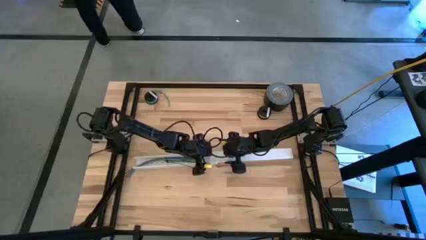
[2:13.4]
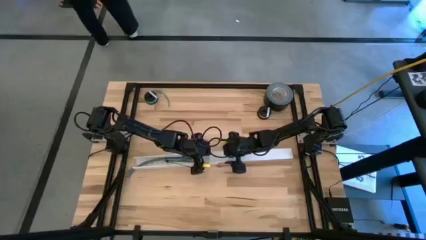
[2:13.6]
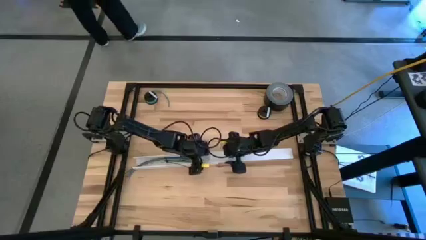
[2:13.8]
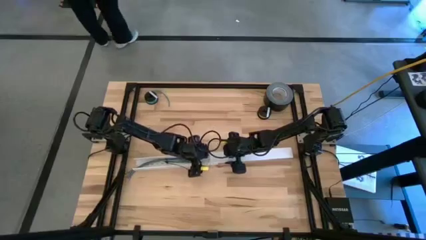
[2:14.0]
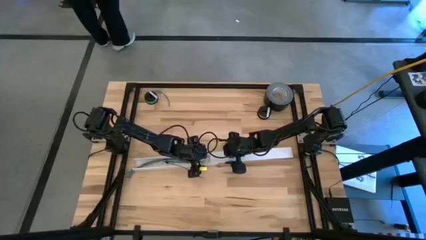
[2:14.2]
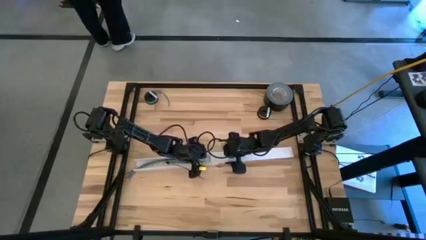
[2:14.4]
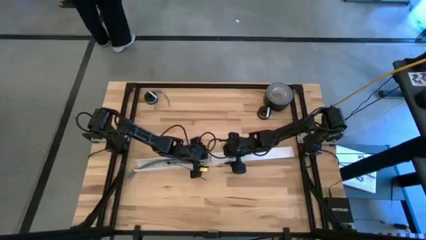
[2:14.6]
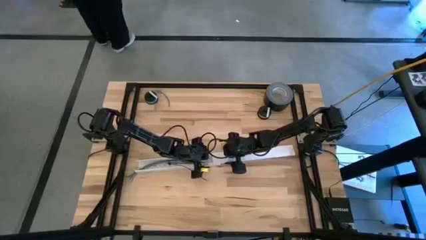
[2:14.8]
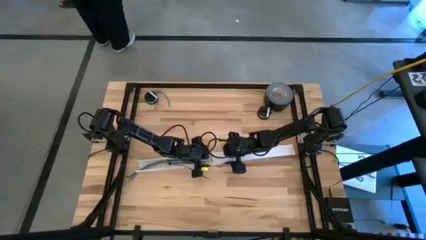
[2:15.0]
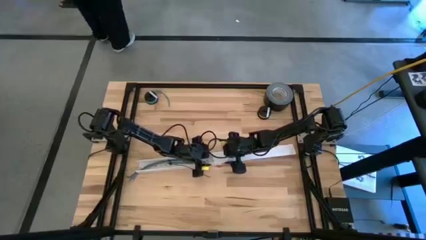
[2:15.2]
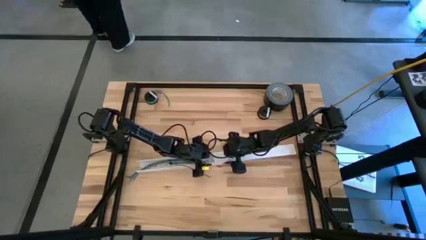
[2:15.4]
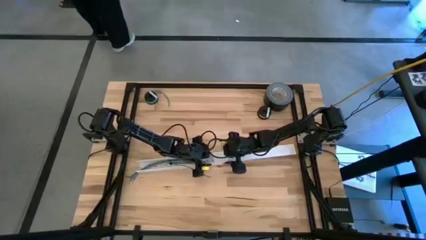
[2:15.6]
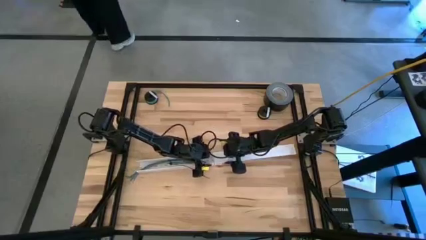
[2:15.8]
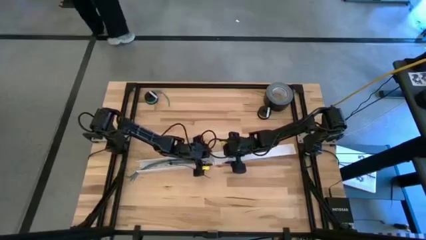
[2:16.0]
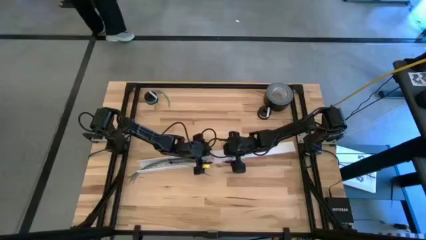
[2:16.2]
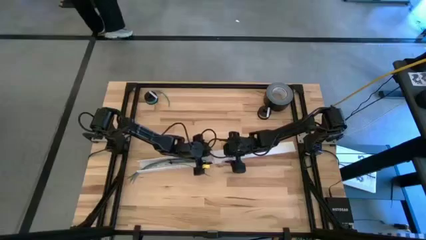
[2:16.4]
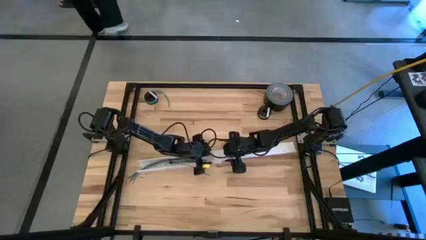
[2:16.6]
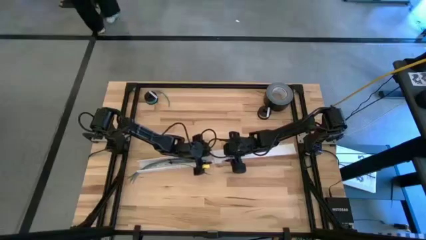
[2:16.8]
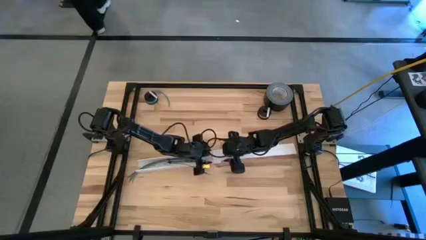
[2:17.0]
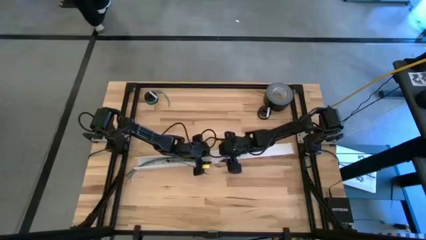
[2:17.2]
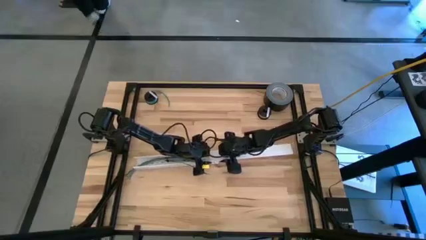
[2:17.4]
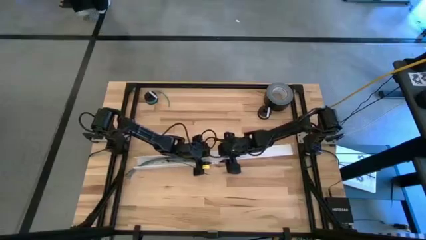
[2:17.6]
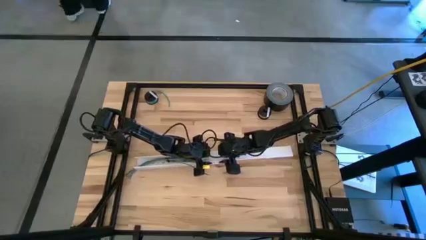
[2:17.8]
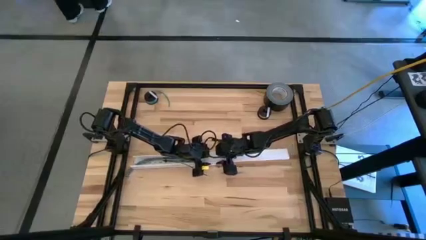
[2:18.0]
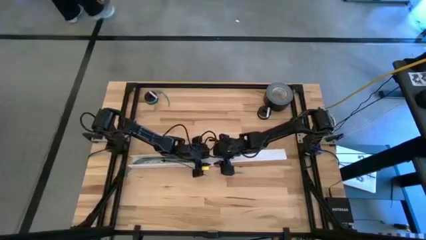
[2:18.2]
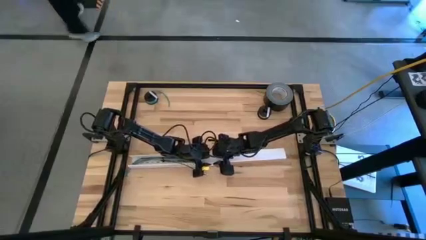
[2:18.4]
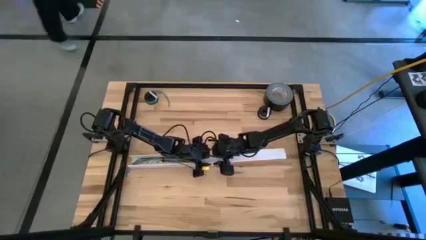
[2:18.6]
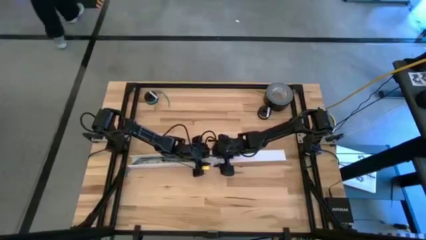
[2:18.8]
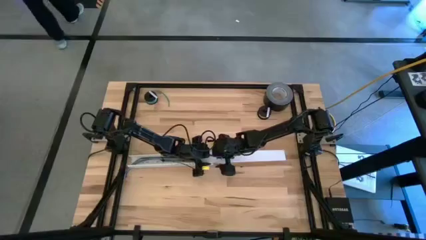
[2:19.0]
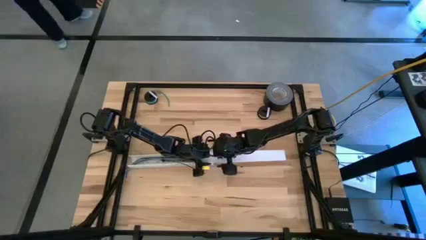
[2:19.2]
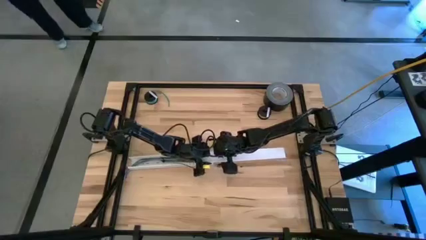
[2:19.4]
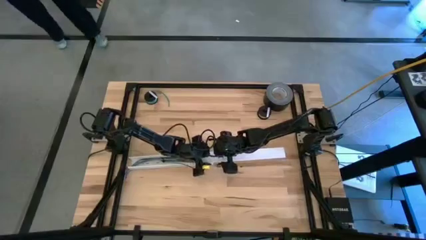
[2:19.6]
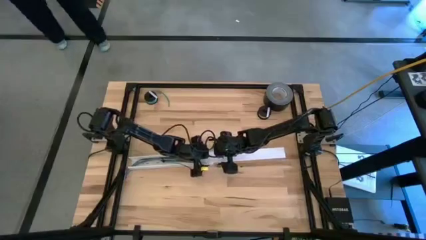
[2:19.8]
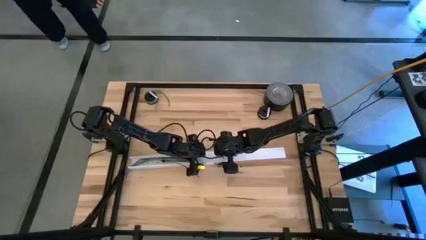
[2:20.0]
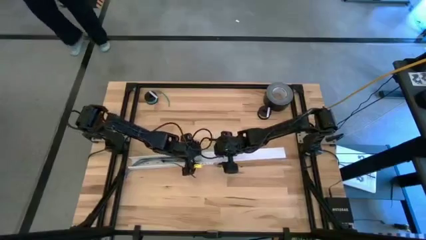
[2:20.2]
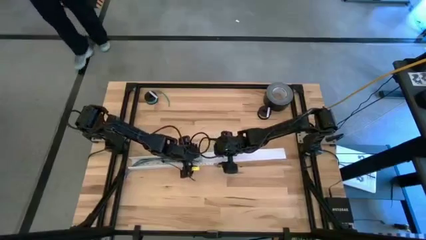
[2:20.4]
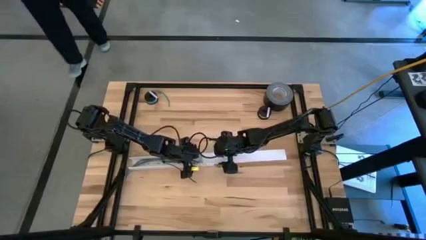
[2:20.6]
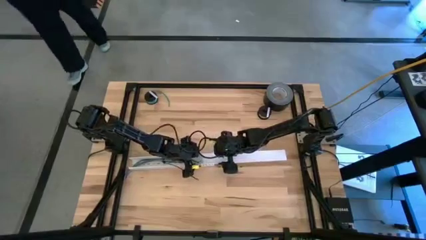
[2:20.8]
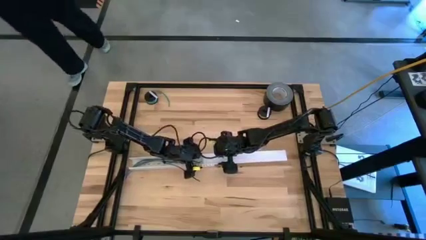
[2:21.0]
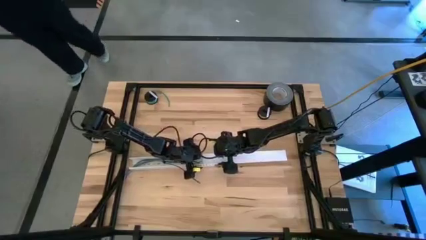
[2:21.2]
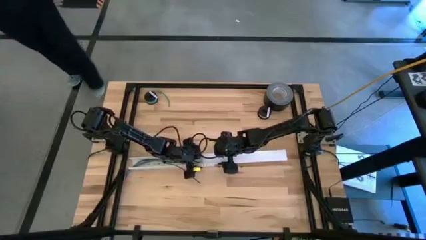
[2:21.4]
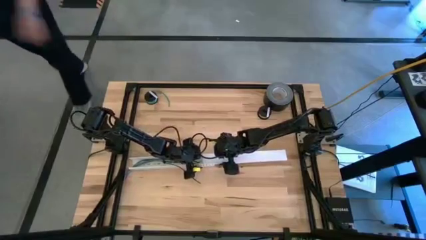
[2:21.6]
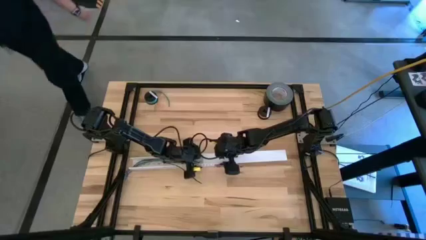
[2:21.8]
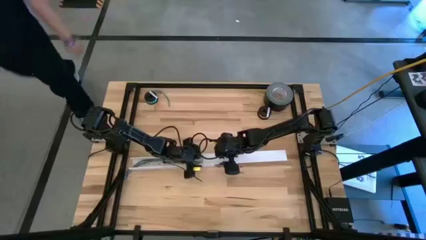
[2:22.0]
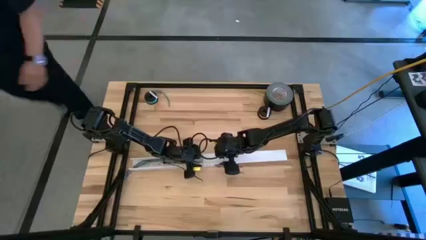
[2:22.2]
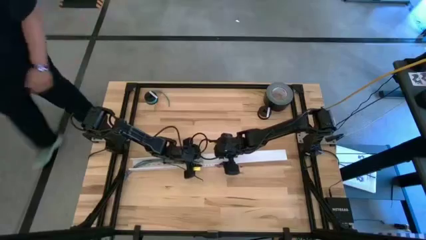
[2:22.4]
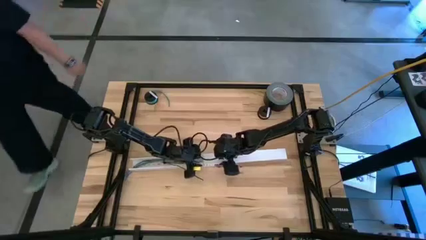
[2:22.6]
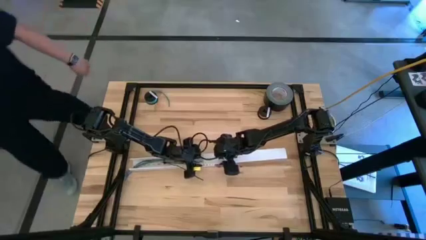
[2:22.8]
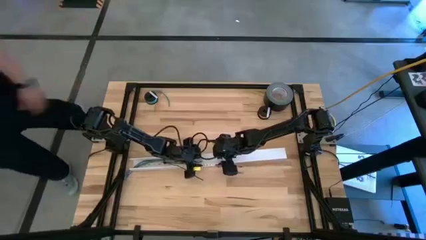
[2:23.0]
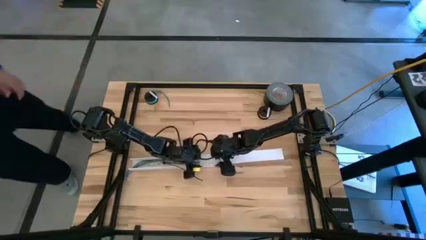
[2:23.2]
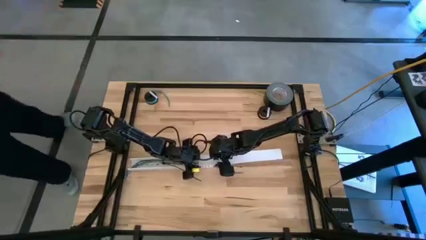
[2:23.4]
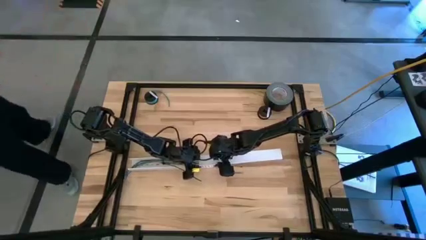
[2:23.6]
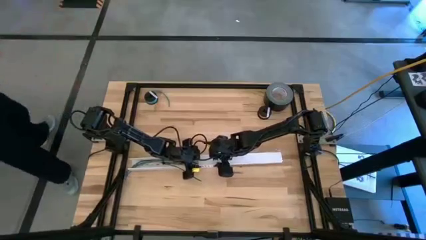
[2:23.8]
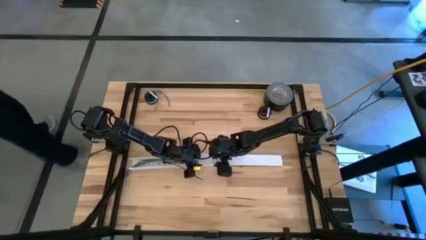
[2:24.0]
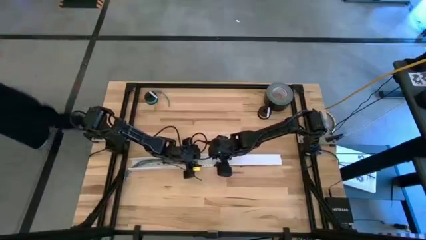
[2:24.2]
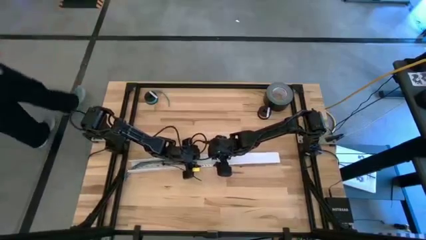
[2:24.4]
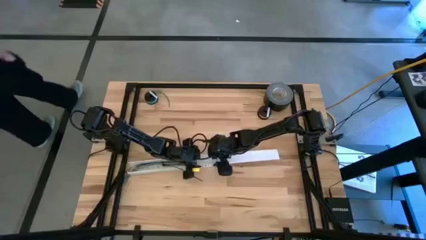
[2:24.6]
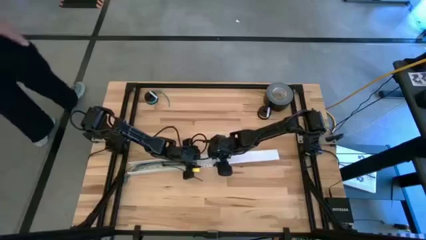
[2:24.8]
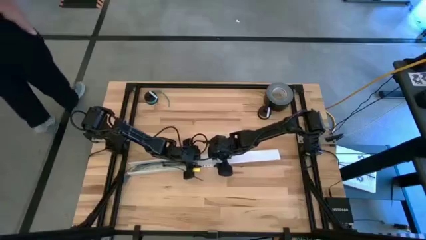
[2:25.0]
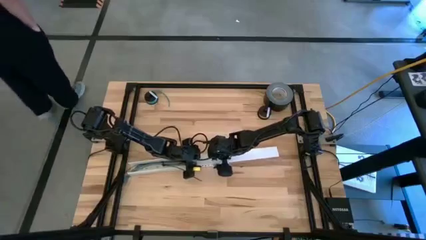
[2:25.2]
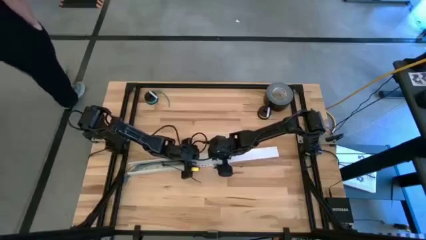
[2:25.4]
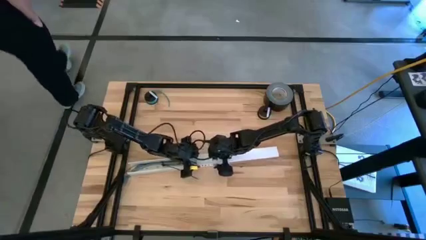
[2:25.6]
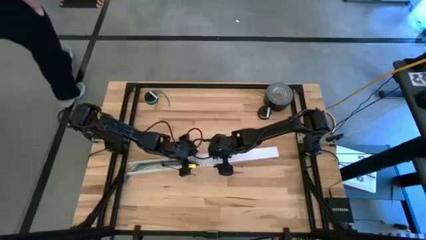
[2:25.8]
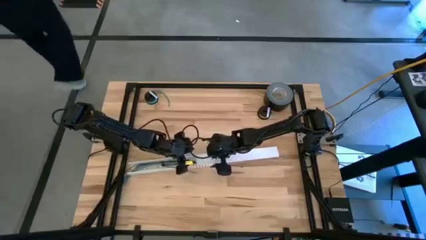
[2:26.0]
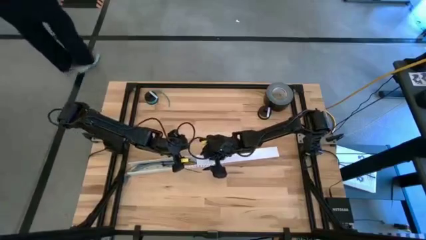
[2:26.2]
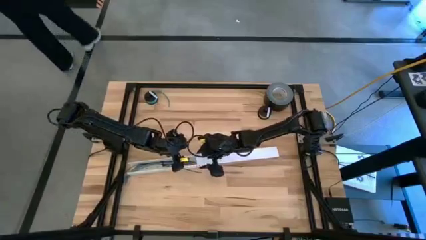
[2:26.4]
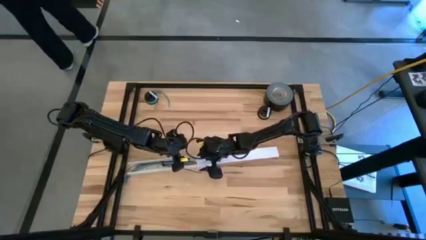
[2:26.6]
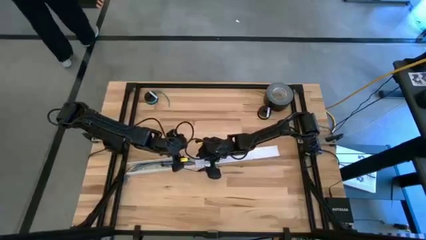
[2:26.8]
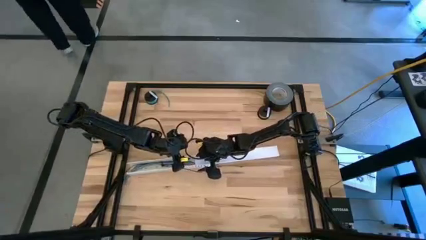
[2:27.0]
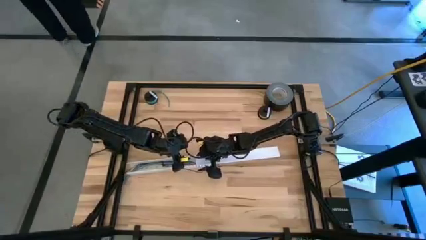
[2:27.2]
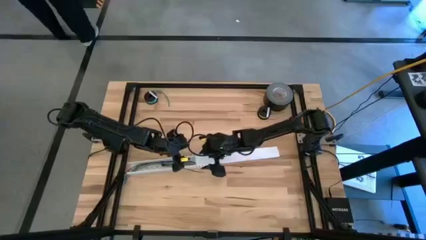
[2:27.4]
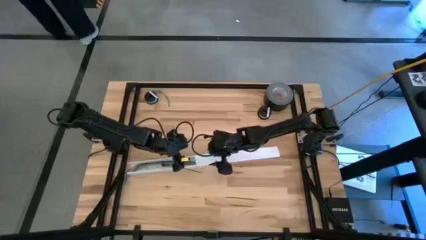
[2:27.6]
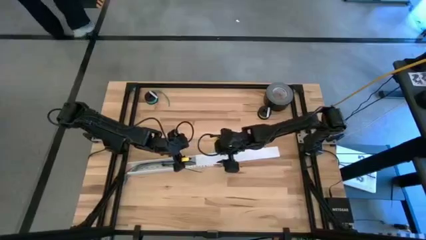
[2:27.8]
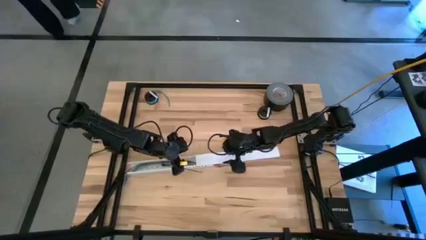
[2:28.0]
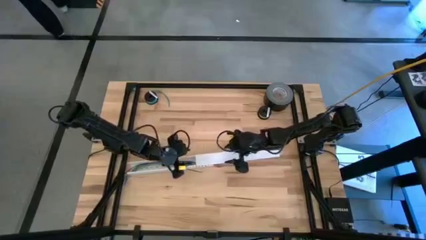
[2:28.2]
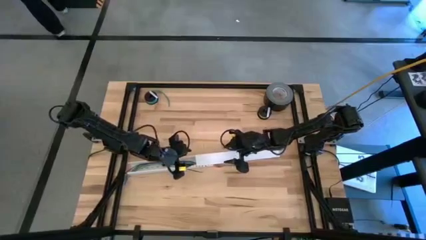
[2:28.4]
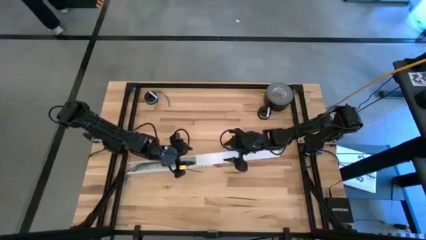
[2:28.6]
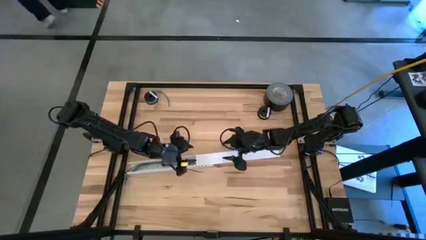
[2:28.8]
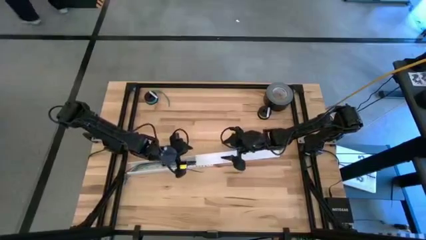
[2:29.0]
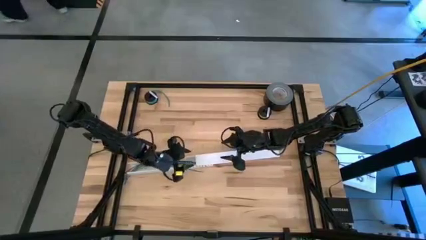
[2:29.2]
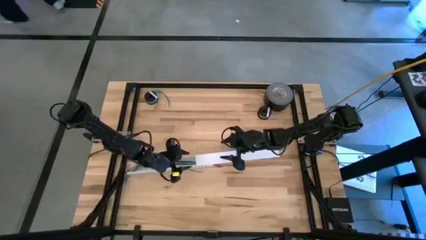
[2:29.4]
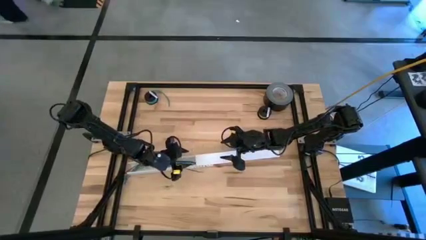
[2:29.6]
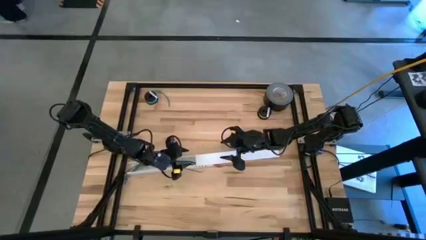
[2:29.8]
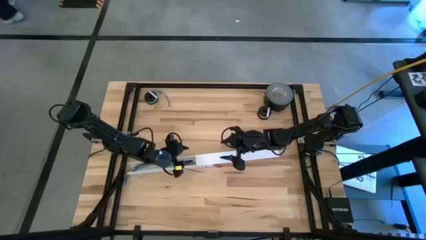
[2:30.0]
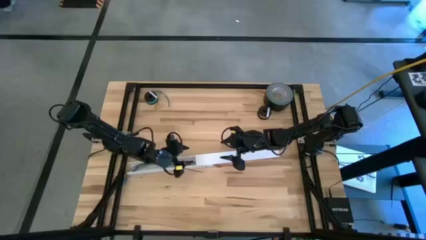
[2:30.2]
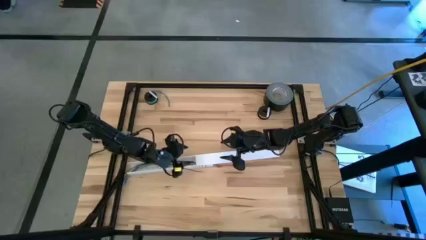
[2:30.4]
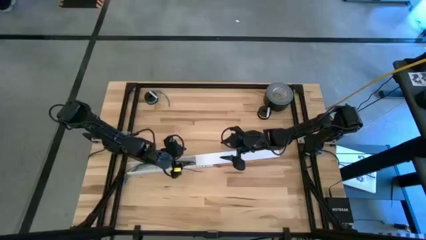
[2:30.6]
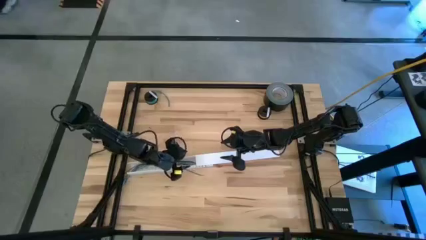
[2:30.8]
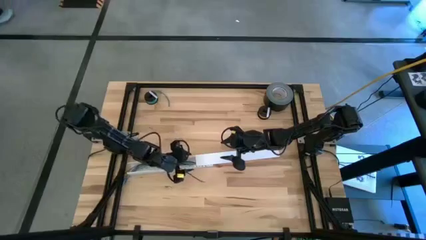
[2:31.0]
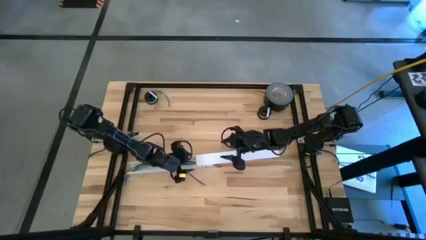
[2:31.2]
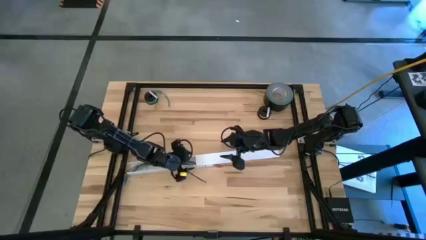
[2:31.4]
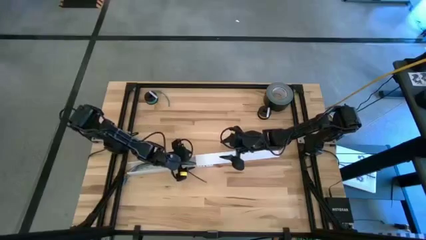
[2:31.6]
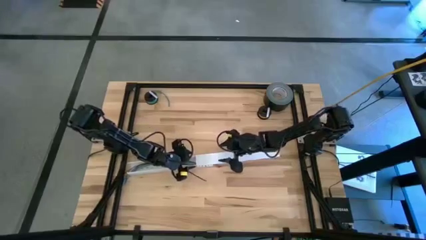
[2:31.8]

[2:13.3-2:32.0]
Task: Ziptie cables
Close the white cable duct
